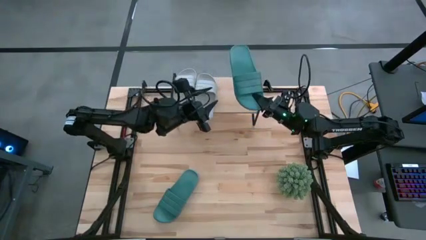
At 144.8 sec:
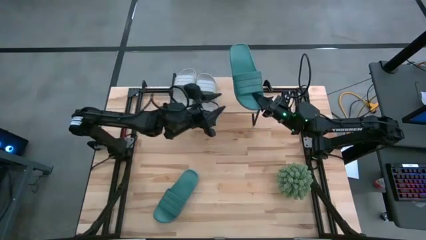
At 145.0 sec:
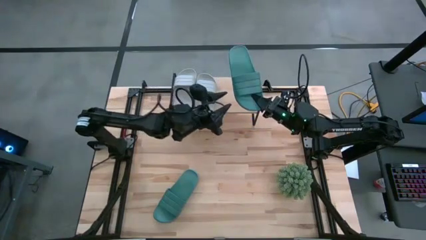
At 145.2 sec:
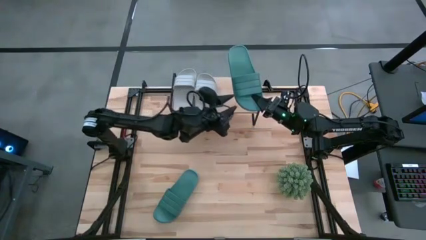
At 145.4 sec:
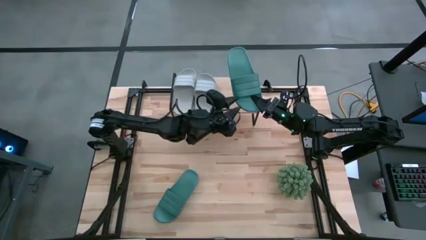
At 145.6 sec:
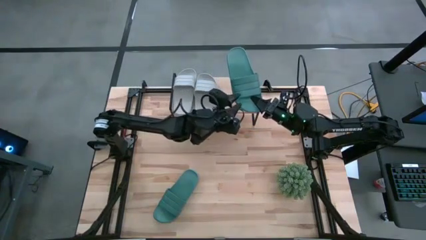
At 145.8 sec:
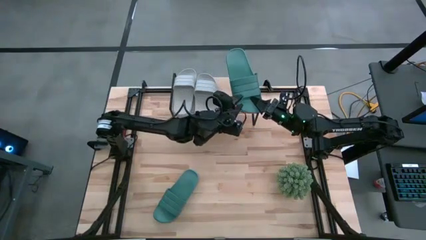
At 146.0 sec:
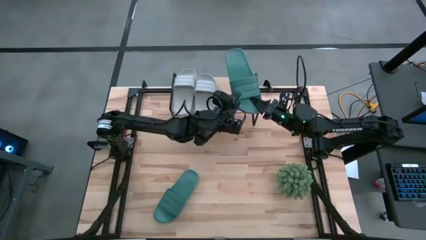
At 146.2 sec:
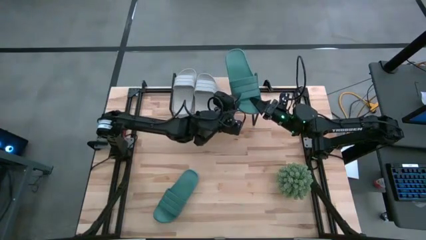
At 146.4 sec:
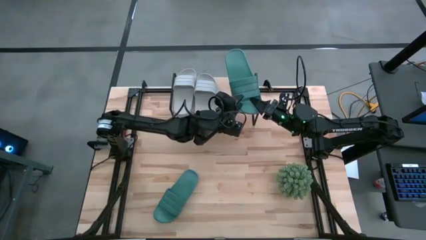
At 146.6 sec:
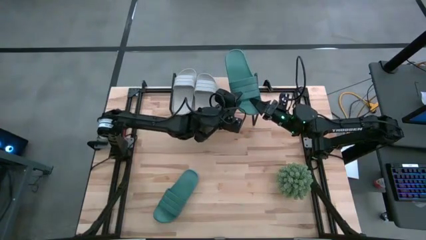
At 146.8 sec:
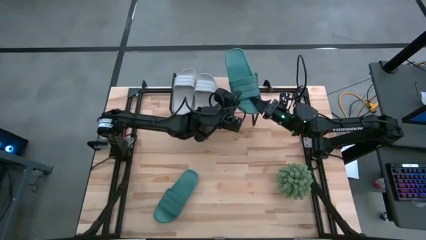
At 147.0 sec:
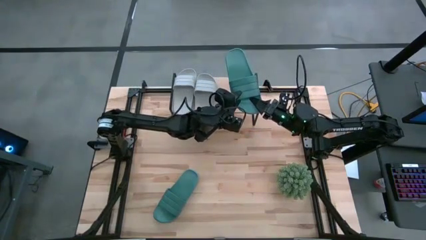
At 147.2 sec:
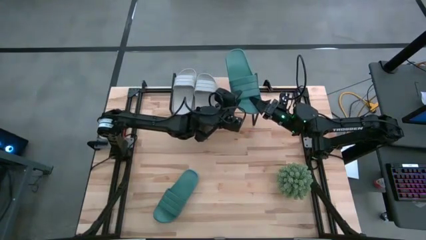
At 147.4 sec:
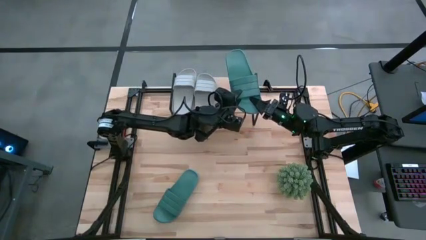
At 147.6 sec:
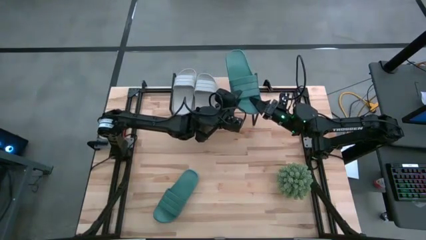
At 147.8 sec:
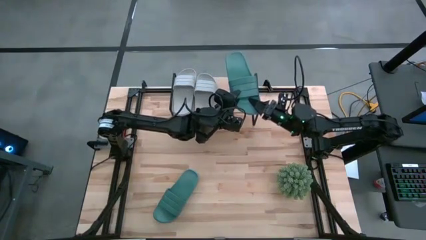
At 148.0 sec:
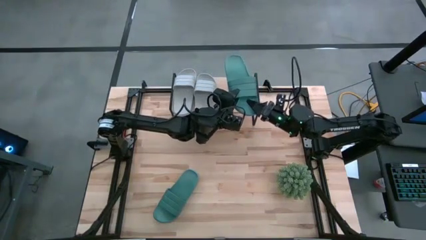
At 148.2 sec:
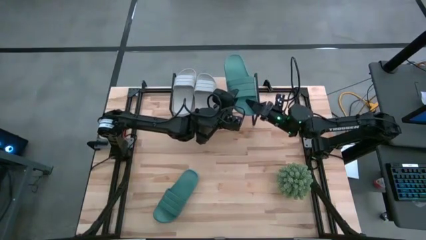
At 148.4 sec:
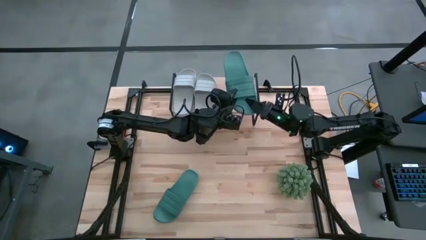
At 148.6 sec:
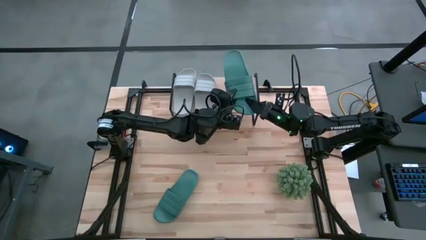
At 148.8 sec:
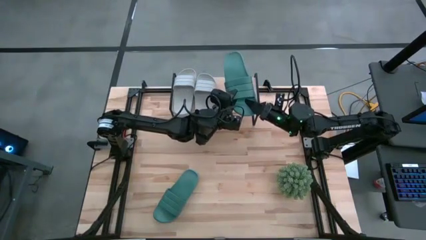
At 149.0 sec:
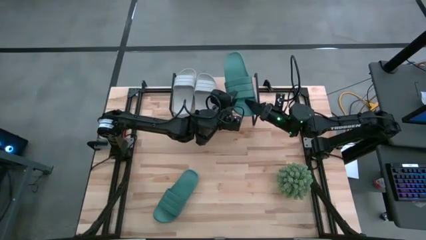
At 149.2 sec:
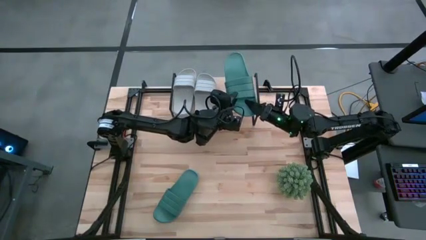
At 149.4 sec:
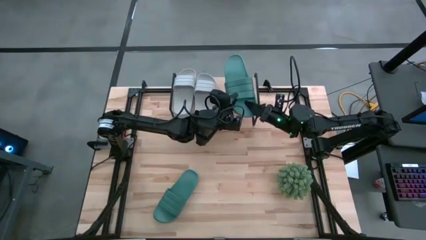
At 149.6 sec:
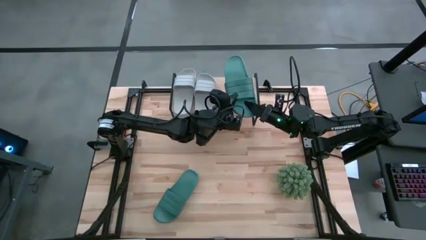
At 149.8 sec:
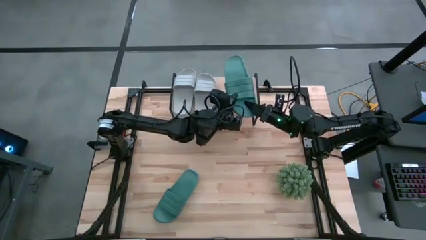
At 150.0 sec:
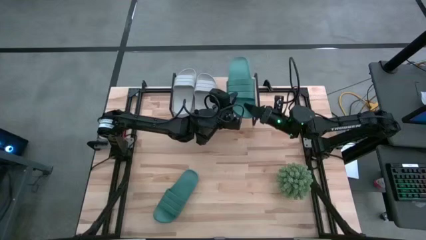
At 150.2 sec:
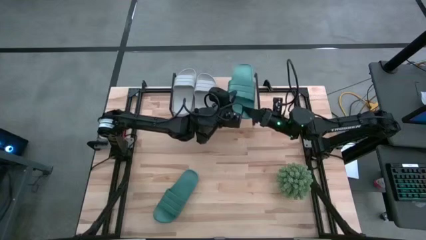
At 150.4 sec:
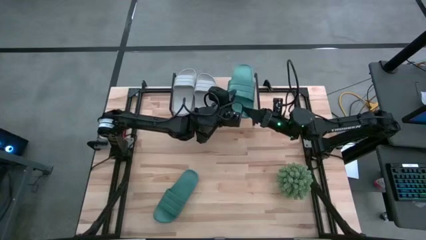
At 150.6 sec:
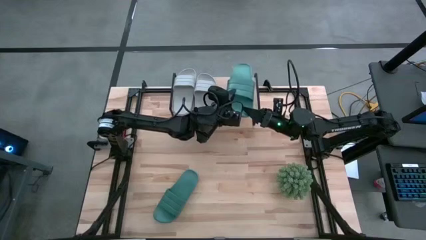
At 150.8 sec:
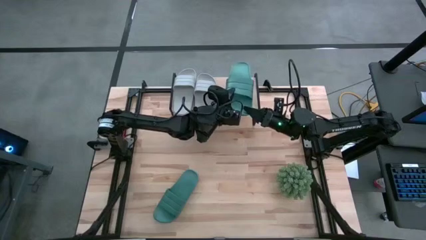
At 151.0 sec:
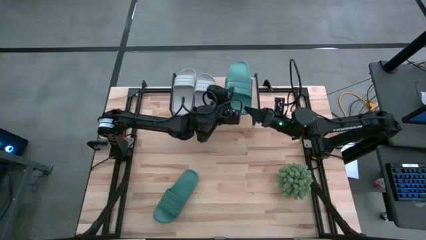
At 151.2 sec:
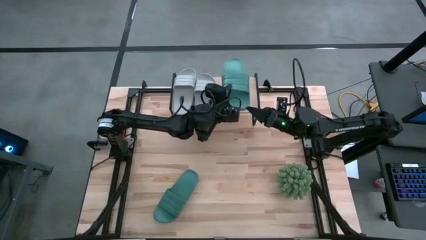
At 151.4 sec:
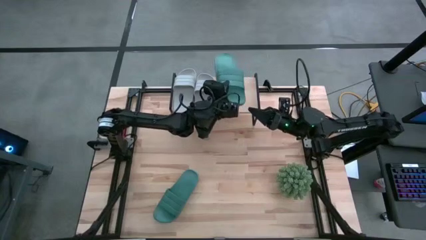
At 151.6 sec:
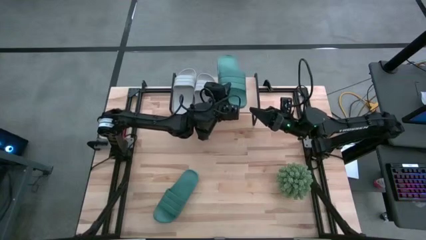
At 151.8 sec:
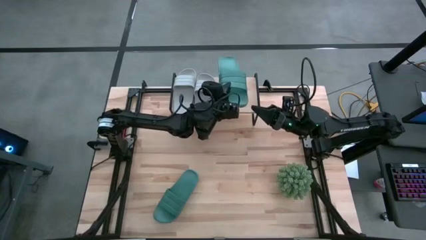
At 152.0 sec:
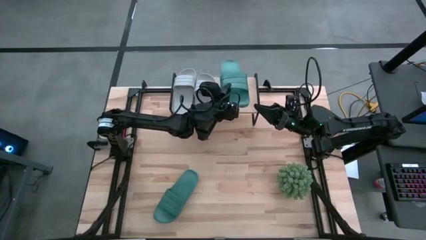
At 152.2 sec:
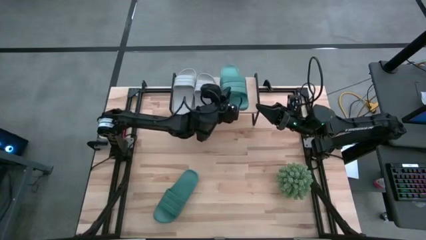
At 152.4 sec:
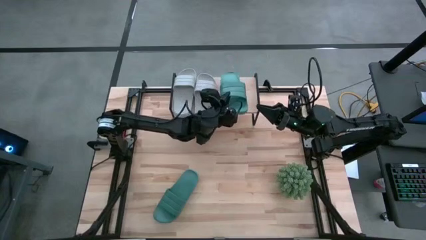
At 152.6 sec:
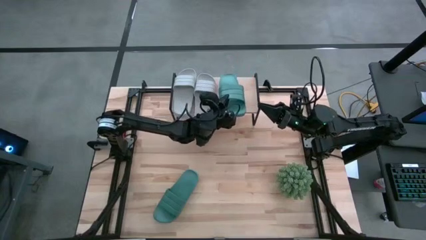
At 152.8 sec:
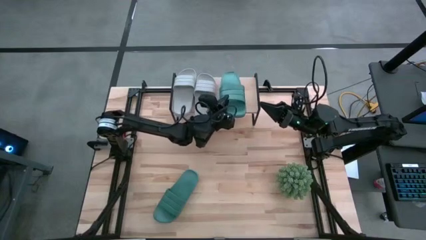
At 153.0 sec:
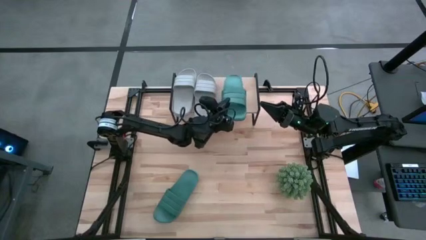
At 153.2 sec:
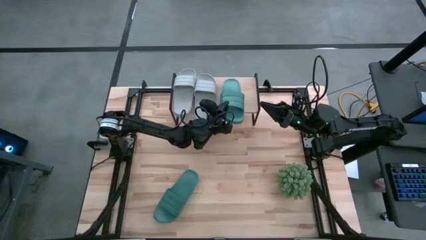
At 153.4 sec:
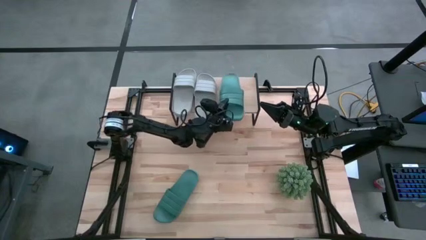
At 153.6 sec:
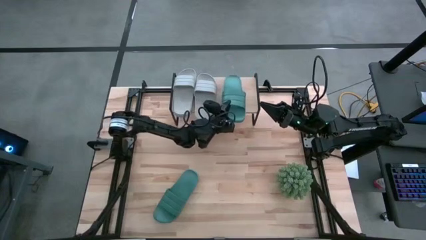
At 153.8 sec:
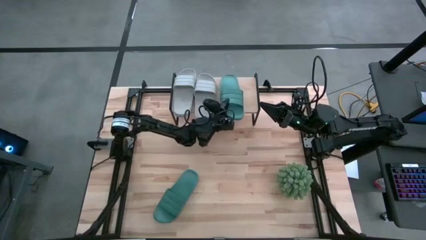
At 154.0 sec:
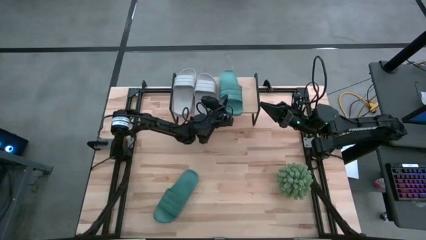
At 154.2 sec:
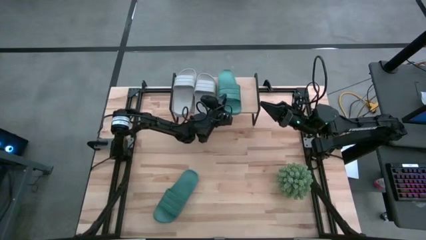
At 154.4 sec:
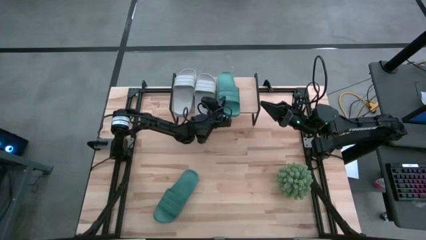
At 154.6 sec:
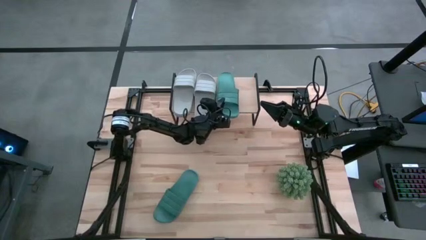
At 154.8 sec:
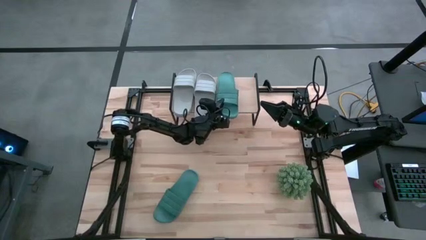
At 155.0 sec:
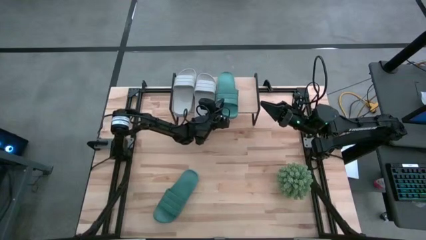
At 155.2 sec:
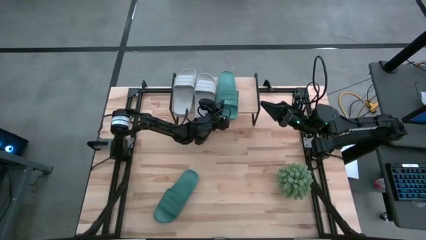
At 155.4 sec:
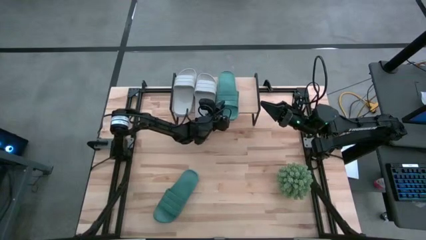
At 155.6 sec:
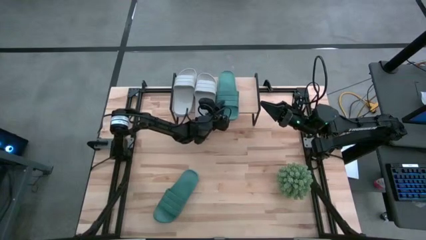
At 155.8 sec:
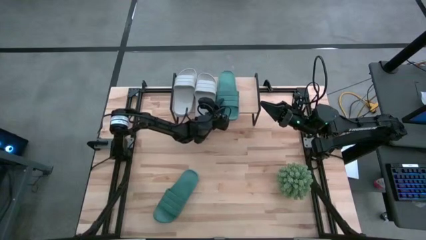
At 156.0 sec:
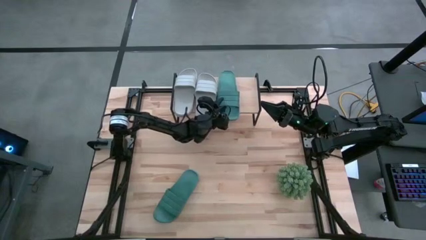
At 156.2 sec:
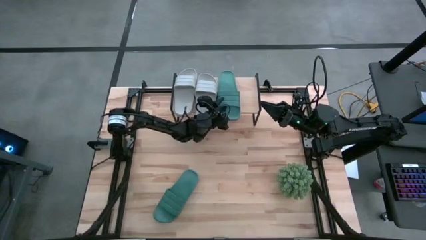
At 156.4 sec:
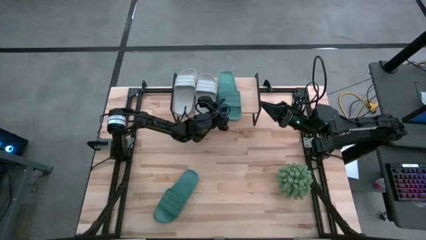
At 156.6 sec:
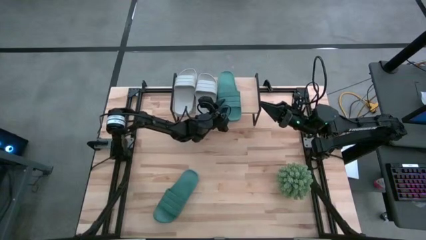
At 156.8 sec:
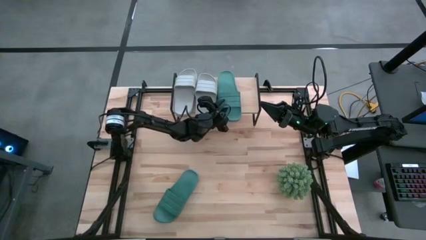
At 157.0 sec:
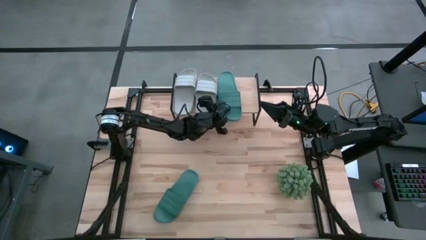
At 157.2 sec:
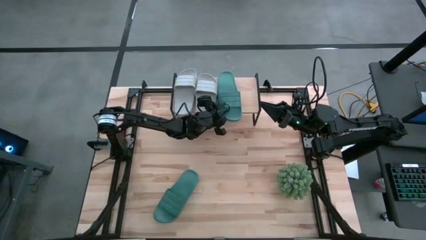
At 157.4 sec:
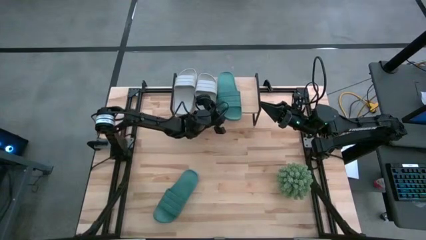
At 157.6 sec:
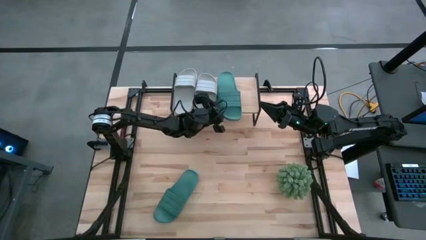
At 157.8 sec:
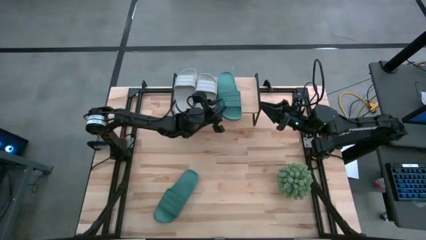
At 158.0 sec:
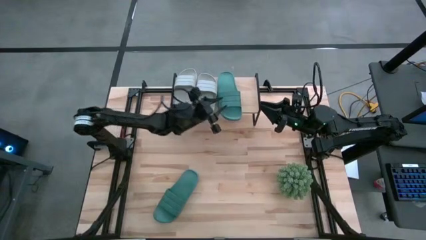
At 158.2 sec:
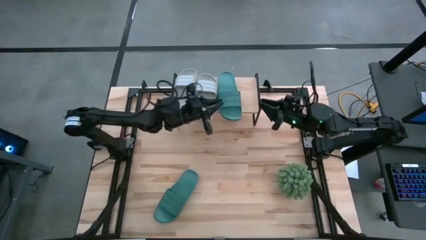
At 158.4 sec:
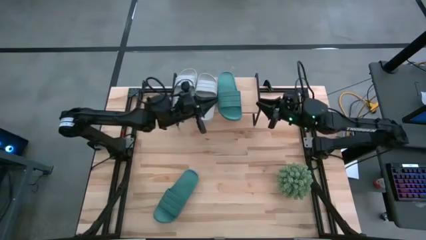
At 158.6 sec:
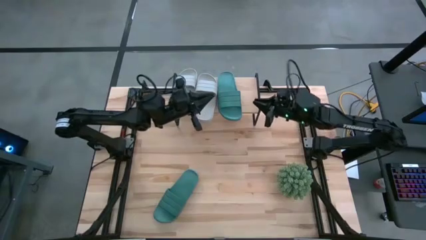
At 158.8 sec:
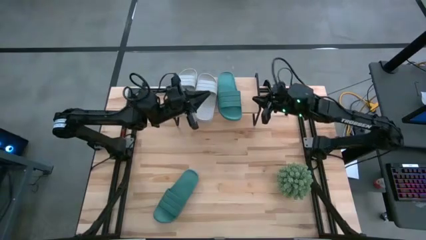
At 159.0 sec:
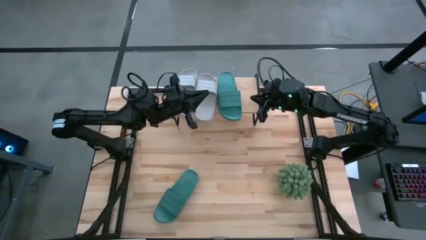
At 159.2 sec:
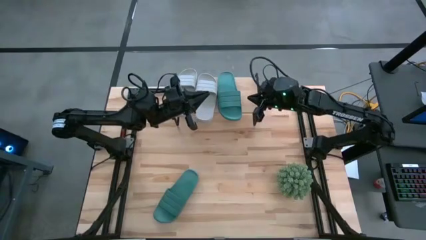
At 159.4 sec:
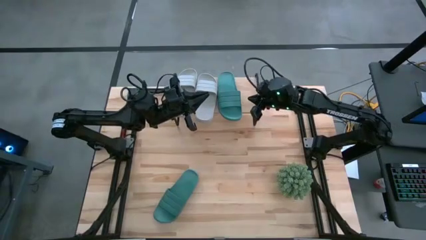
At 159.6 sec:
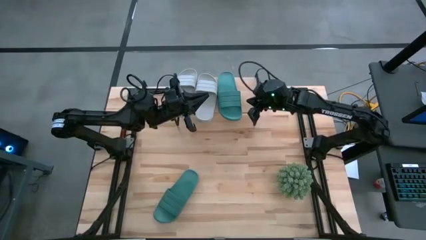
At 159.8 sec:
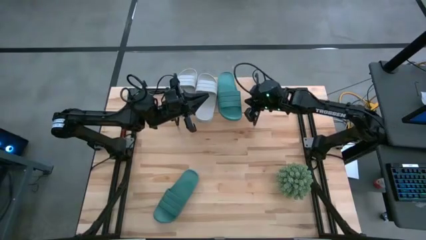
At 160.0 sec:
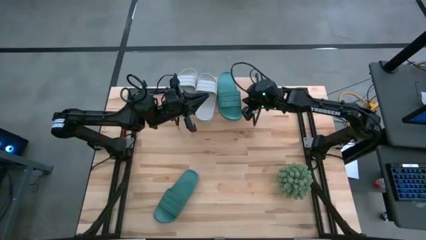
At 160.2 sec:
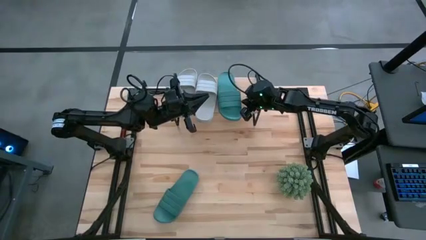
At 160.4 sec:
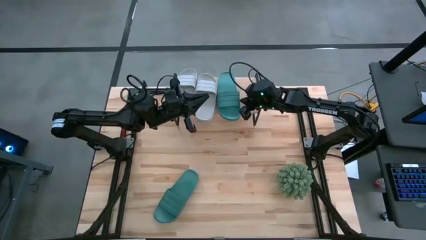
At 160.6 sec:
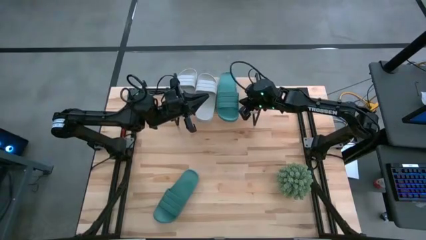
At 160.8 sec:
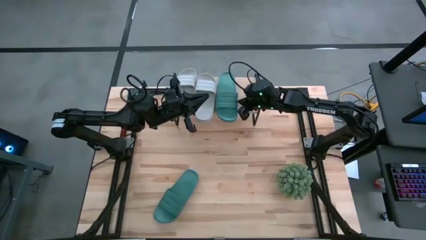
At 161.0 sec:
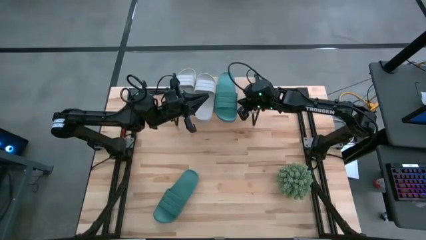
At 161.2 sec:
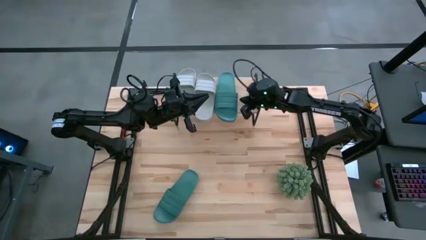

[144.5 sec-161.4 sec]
Task: Pick and place slides into the shelf
Put the left green slide on the shelf
